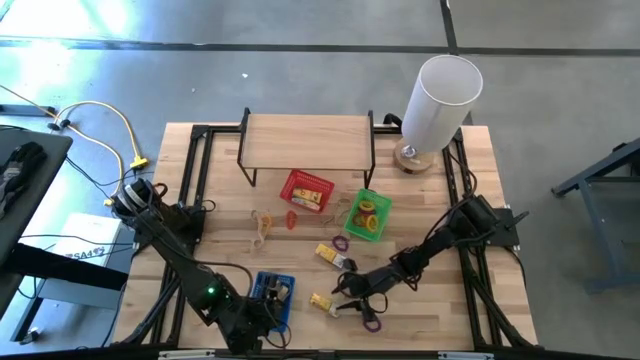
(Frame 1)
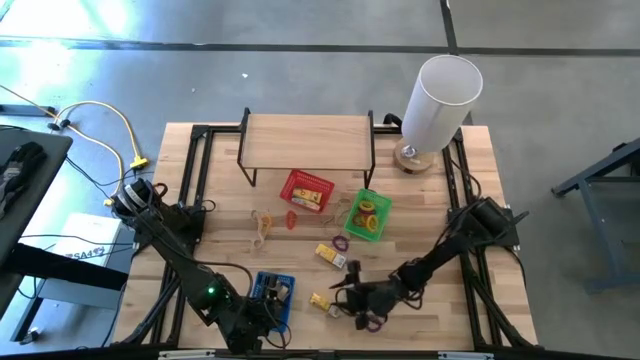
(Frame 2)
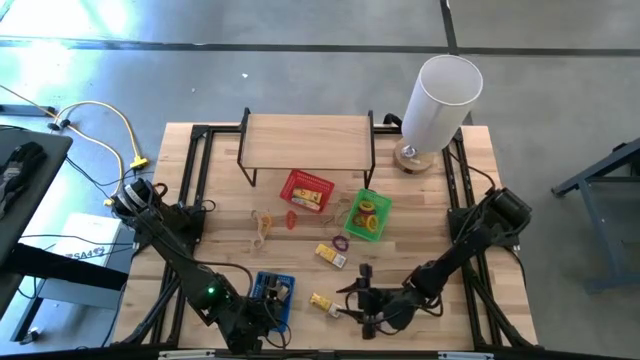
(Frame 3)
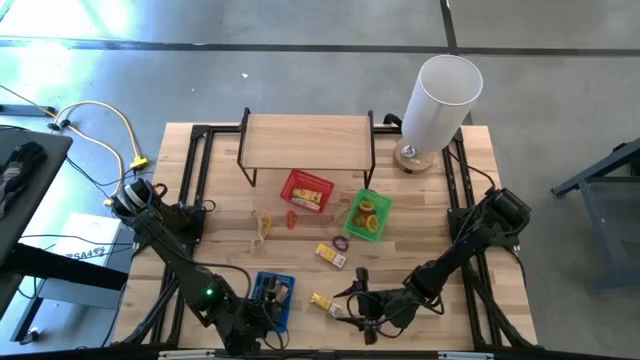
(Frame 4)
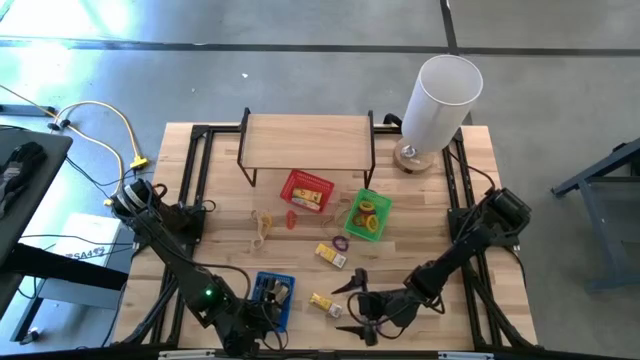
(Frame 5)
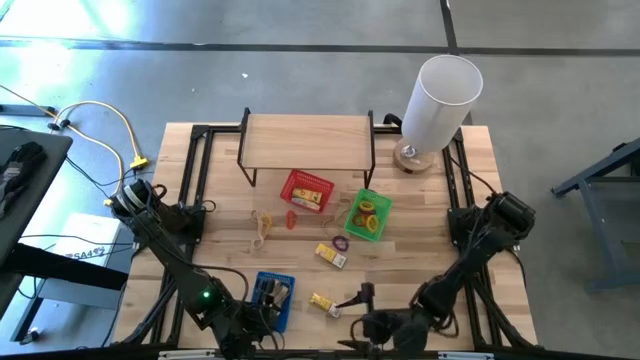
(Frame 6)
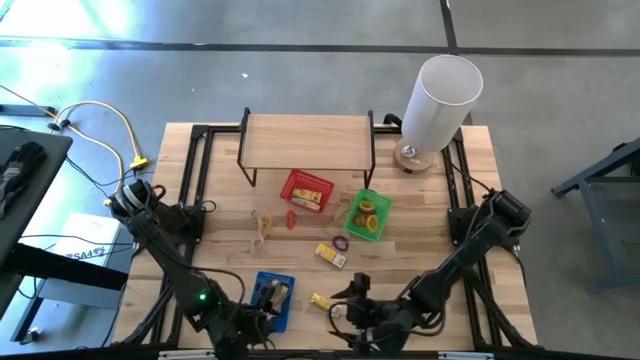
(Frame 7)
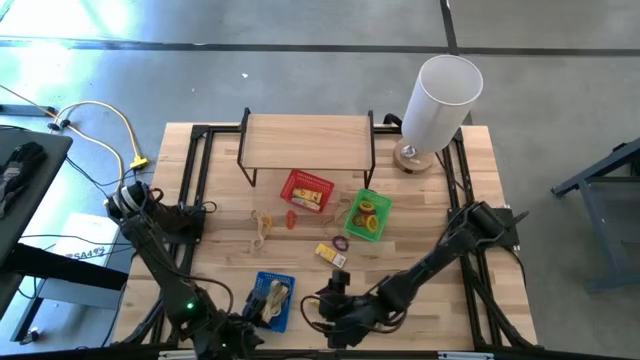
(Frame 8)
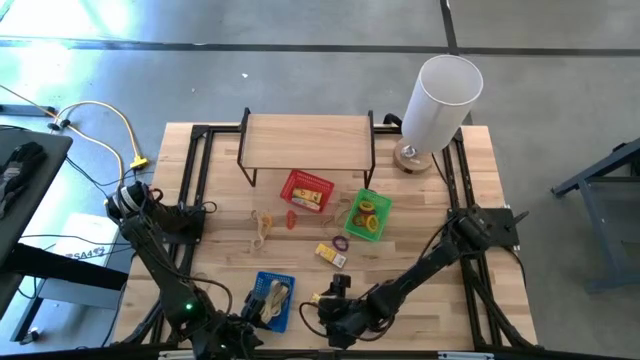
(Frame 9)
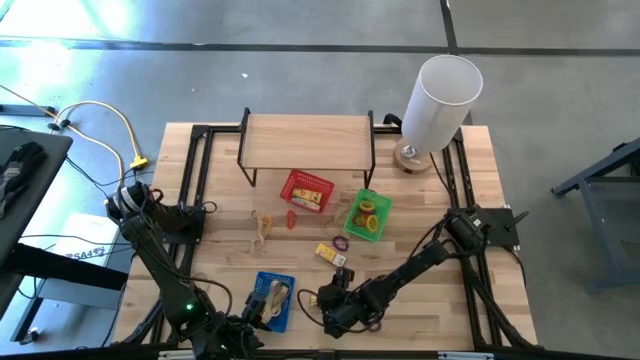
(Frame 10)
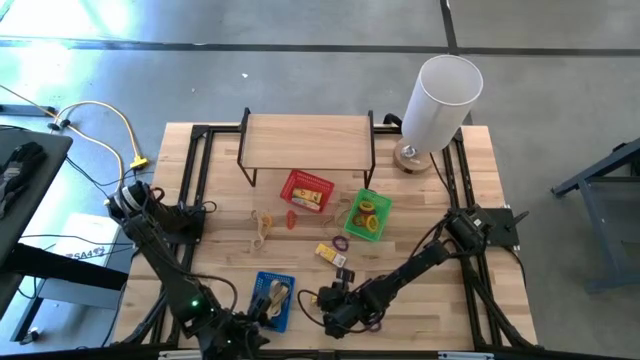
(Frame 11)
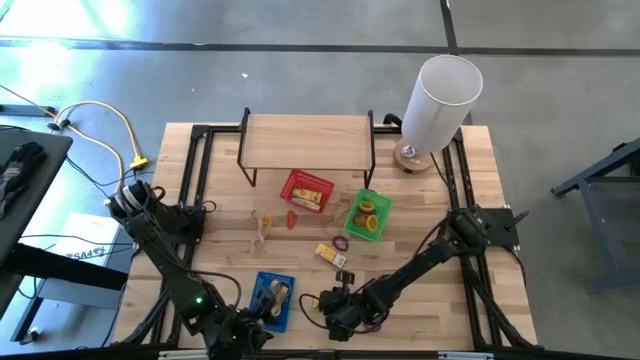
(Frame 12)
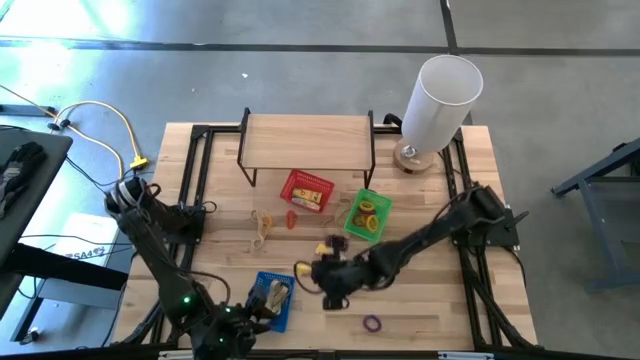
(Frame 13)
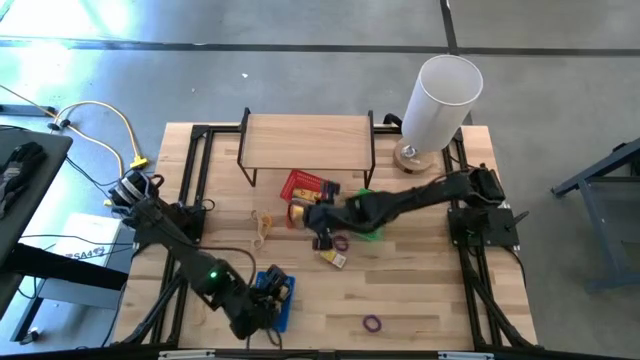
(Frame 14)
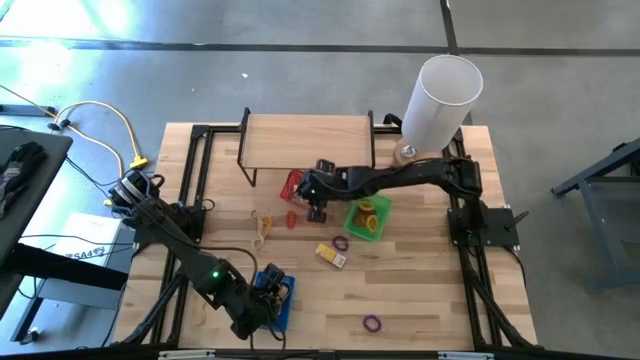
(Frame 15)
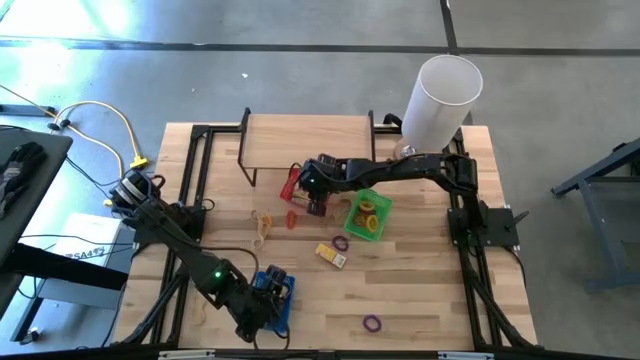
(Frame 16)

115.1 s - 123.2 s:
Task: Pick & Place Office Desk Supplies
Put the yellow crayon box into the red bin

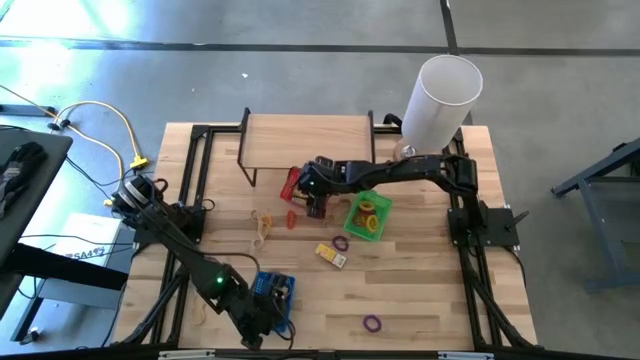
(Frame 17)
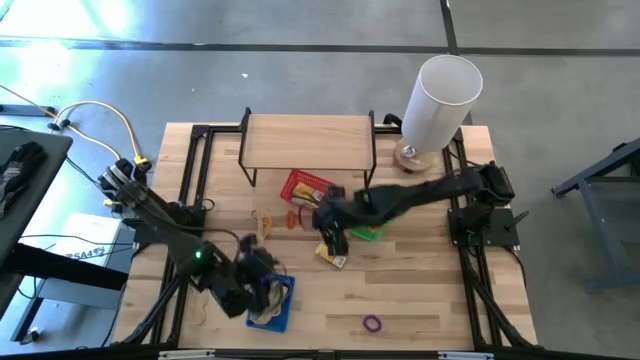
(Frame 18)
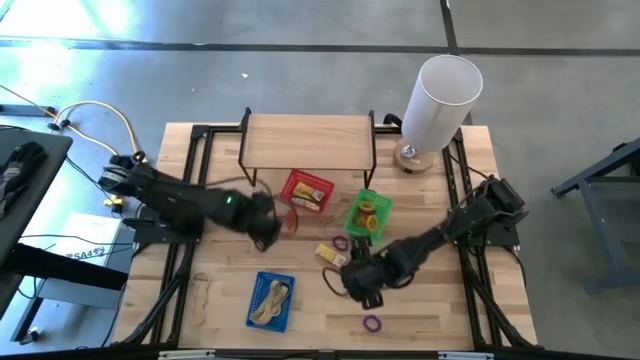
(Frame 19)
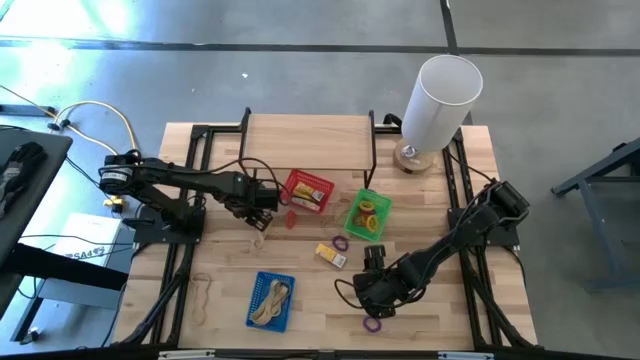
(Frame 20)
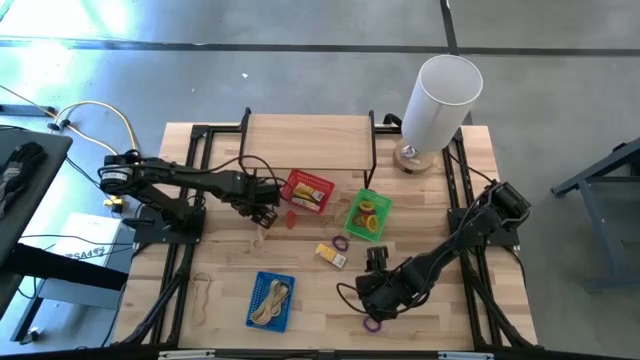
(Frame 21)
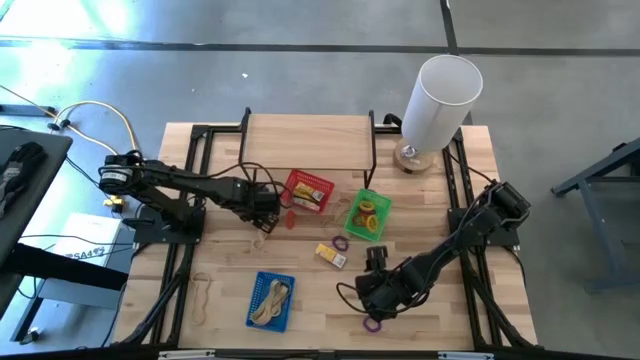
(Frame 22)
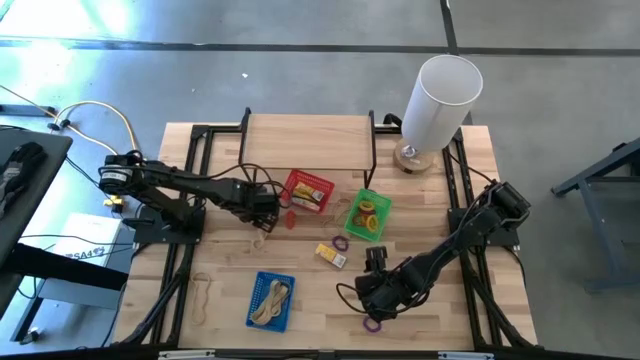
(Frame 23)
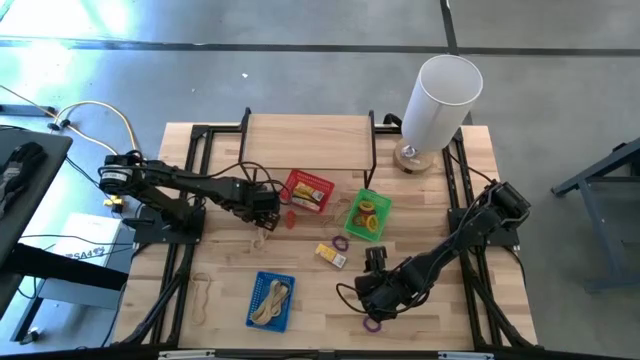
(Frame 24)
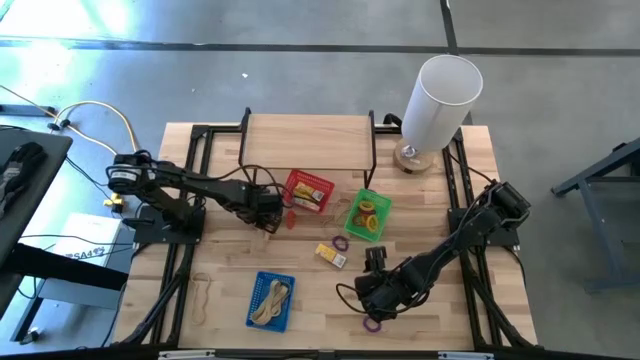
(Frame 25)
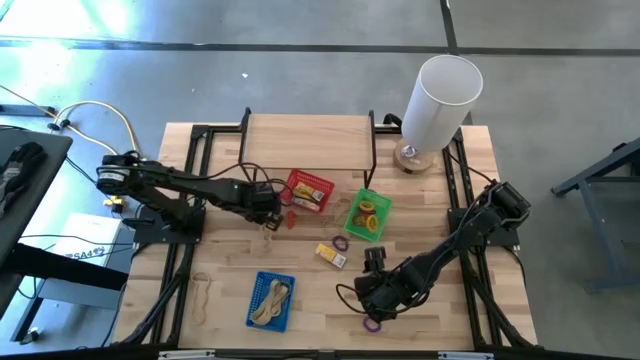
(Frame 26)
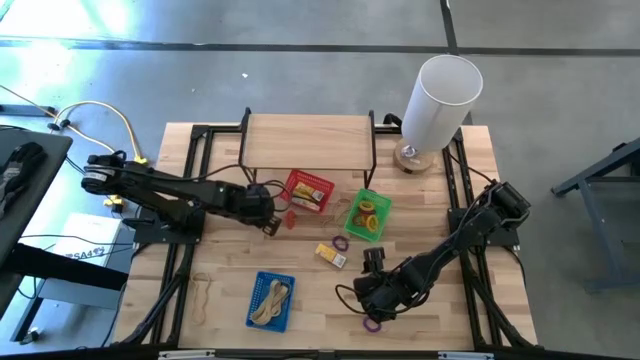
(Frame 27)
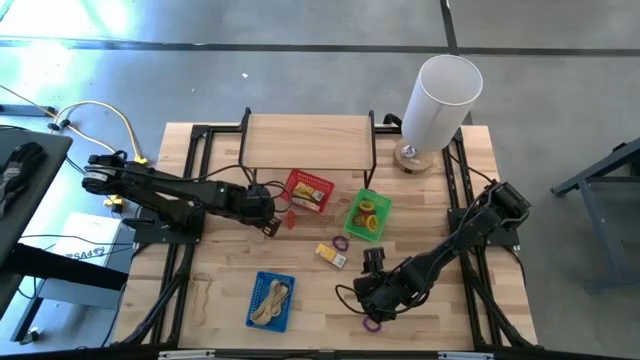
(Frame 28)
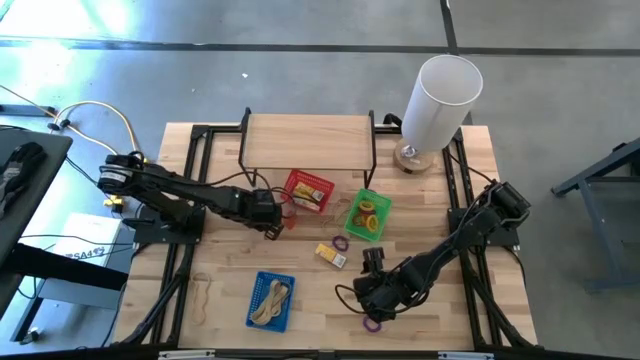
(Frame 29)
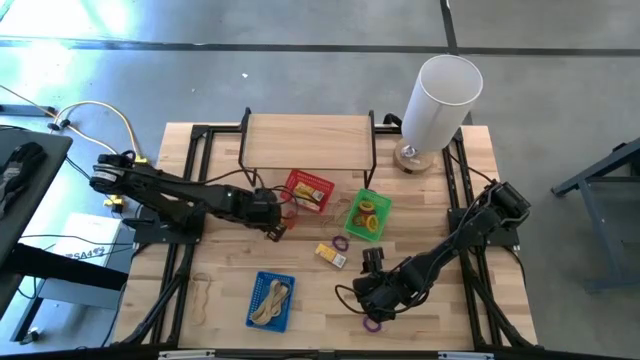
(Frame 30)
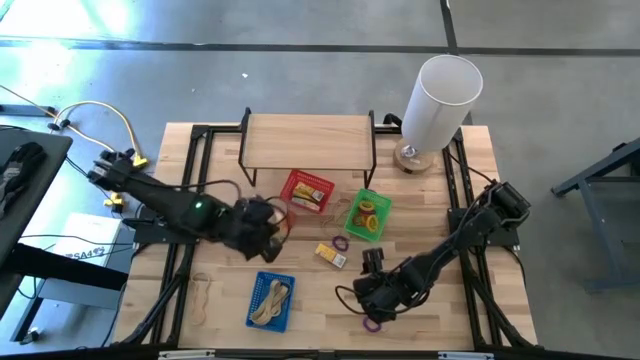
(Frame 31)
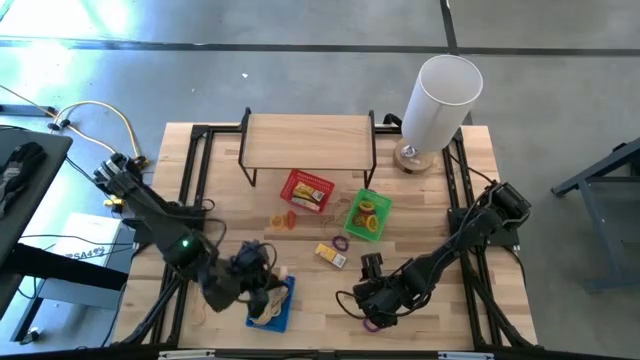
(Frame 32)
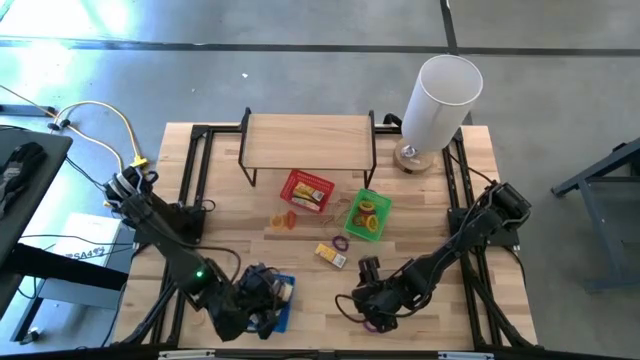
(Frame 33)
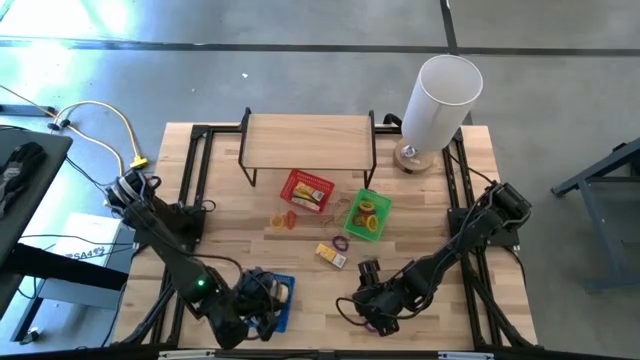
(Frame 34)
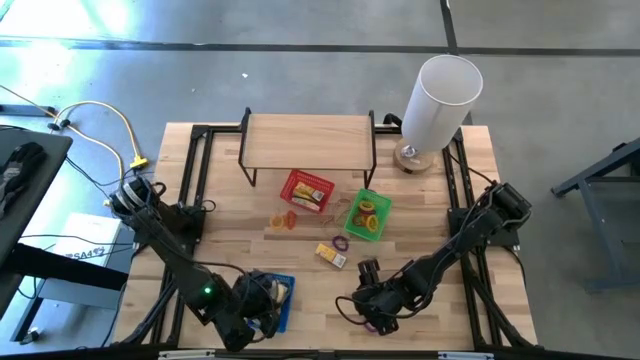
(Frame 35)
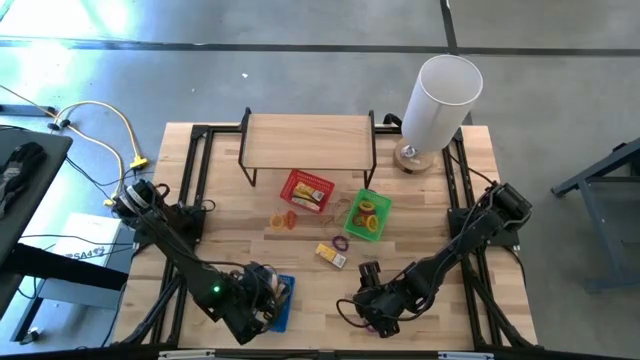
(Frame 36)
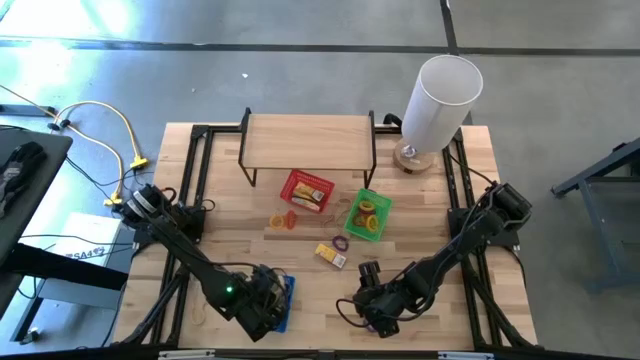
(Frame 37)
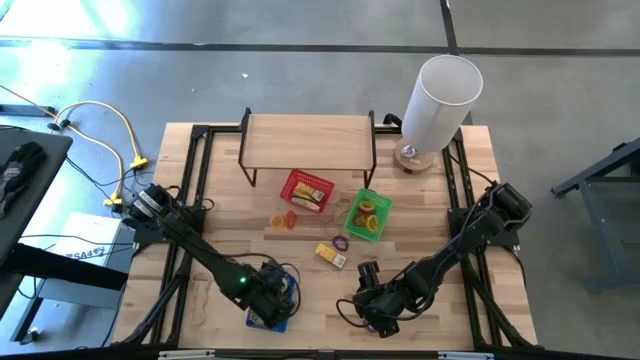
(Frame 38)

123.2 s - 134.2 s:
Put the brown rubber band into the blue bin

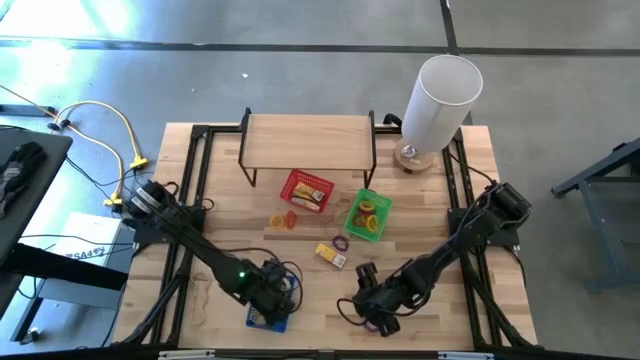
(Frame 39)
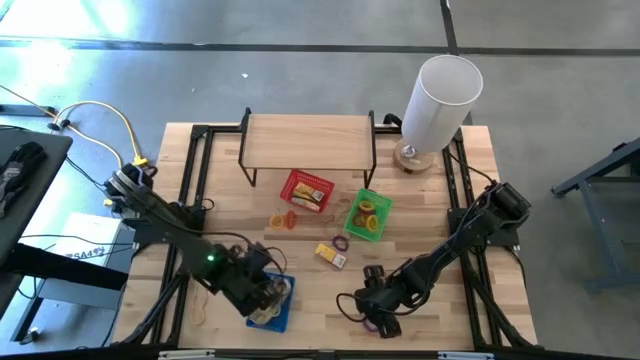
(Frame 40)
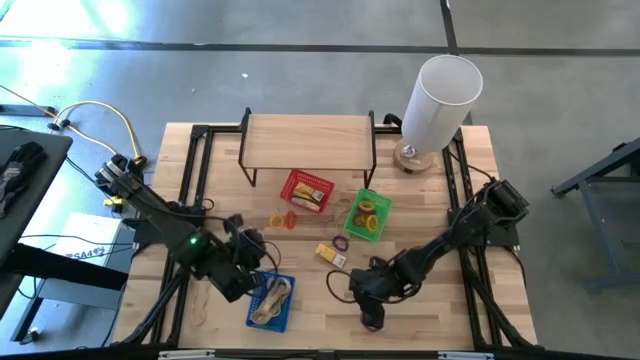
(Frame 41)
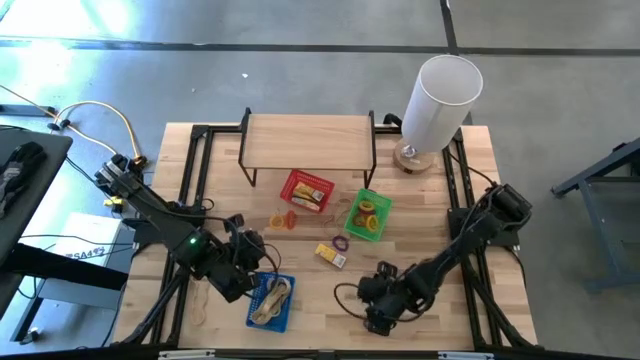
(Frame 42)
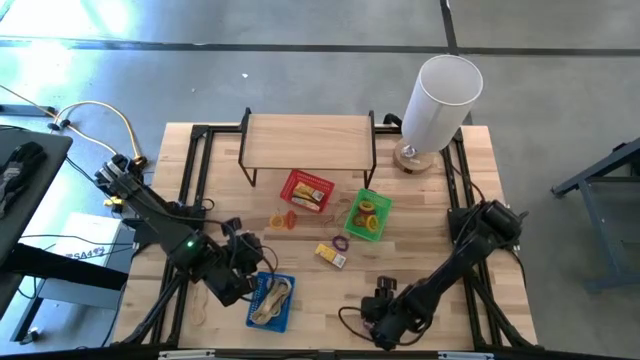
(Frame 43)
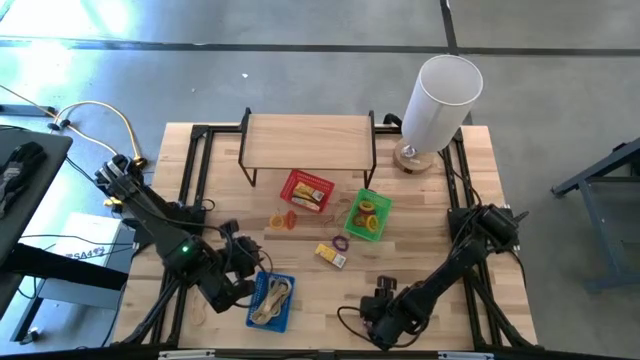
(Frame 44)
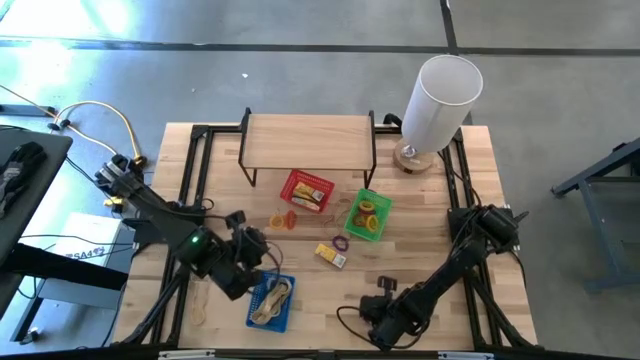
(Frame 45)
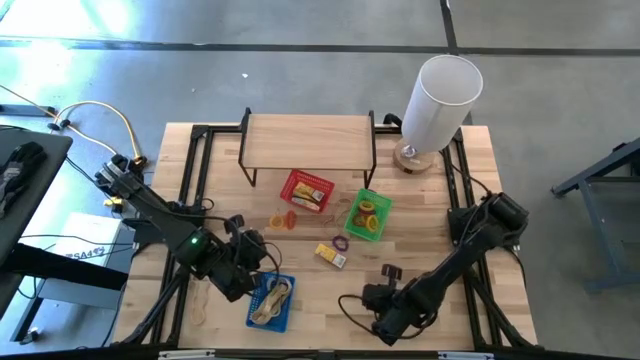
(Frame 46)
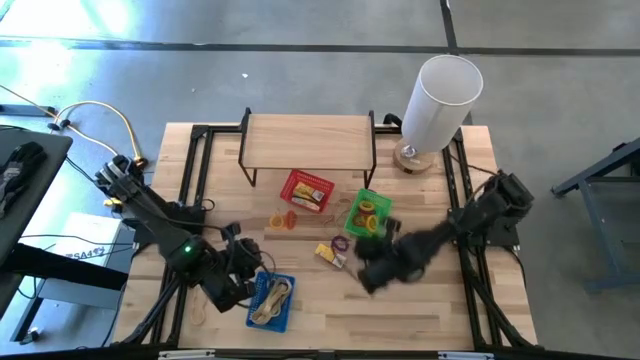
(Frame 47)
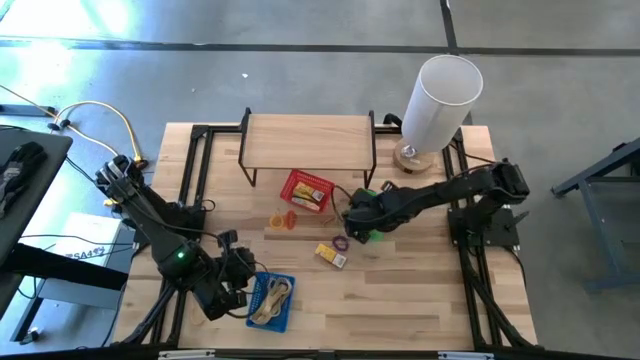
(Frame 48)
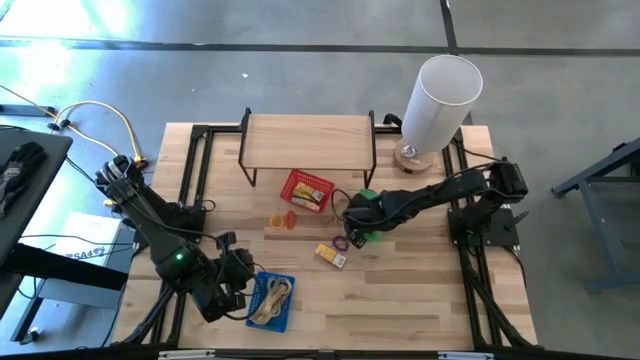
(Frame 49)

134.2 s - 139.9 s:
Put the violet spring keychain into the green bin
